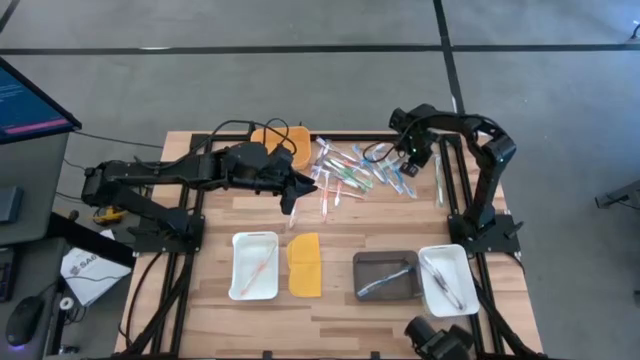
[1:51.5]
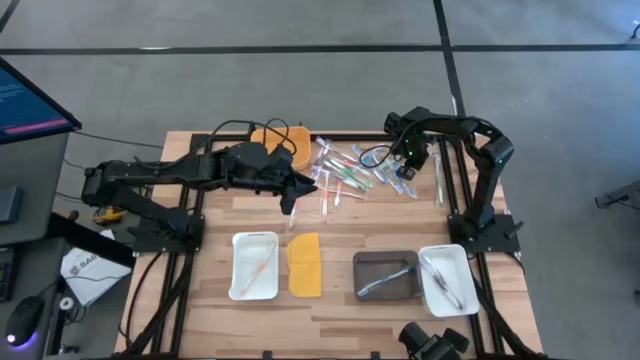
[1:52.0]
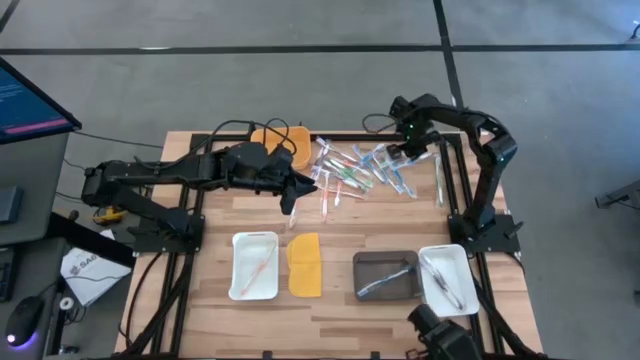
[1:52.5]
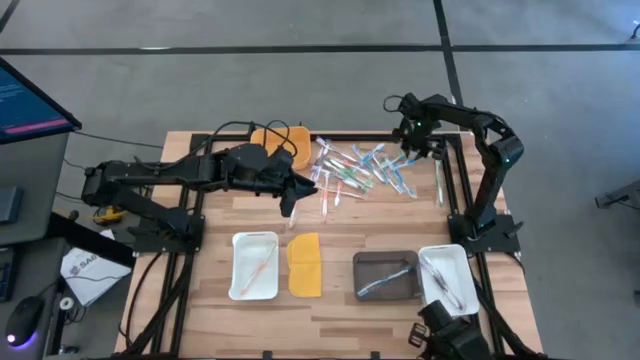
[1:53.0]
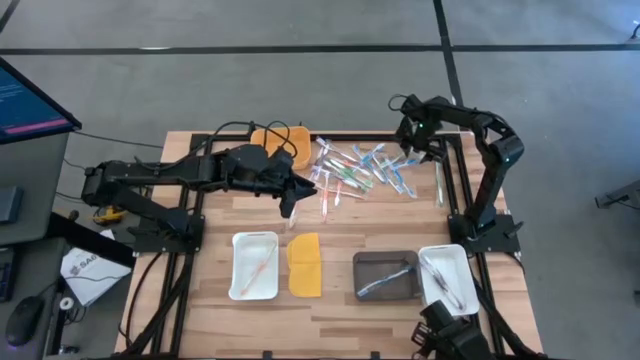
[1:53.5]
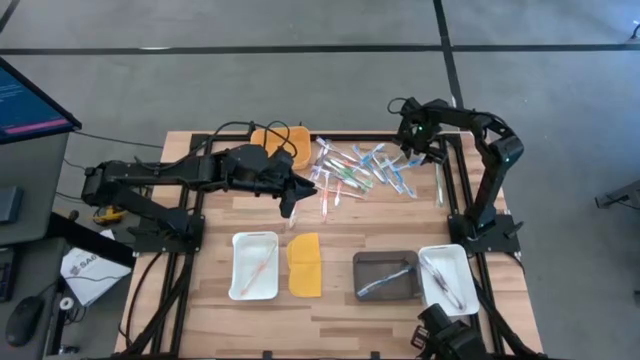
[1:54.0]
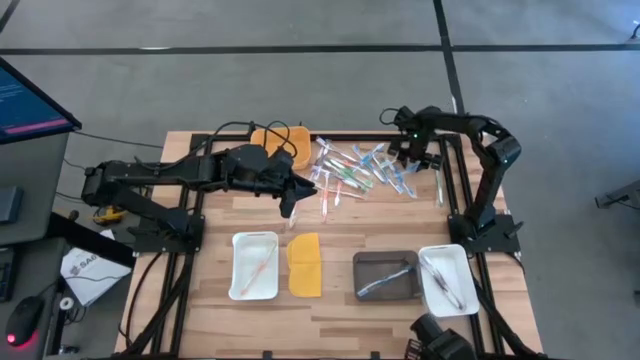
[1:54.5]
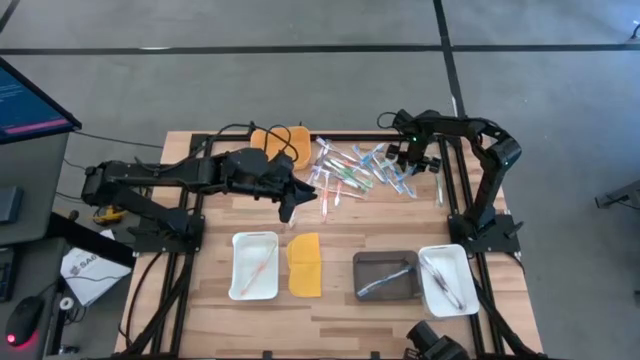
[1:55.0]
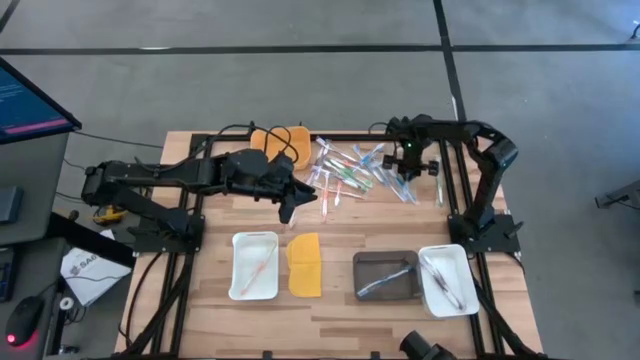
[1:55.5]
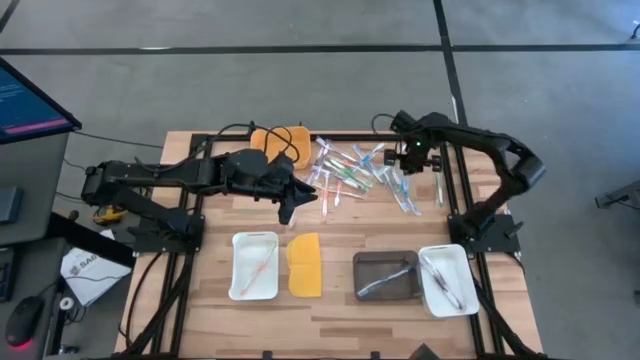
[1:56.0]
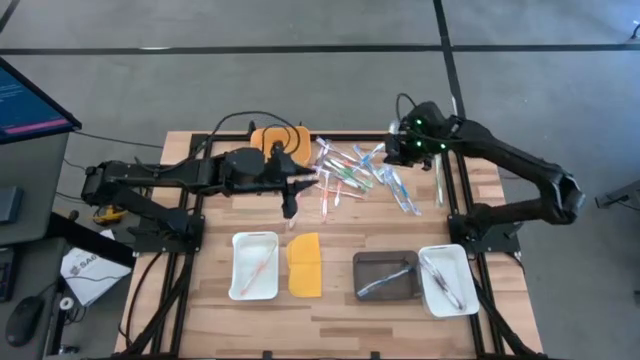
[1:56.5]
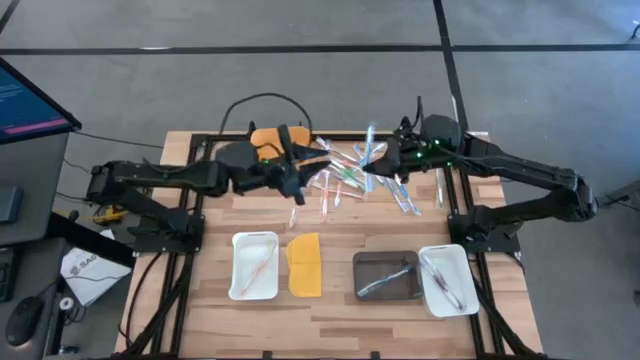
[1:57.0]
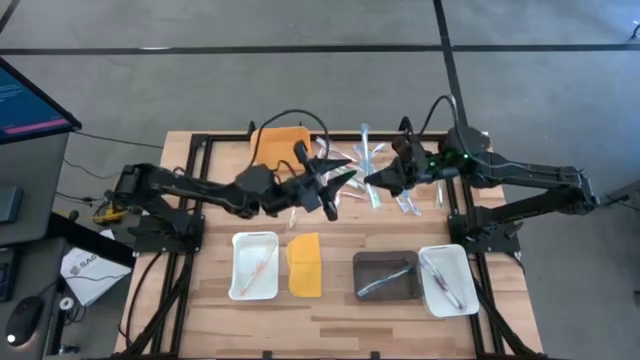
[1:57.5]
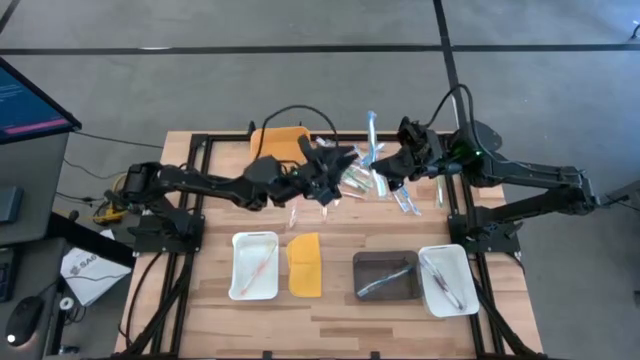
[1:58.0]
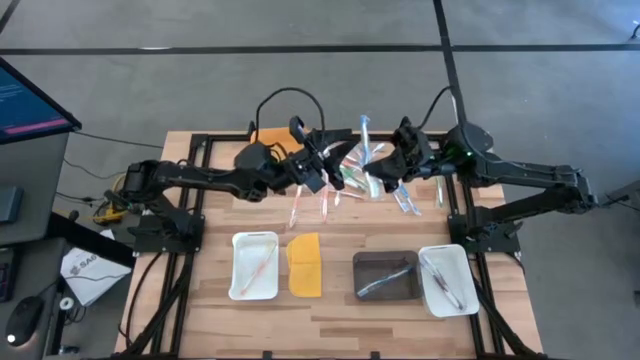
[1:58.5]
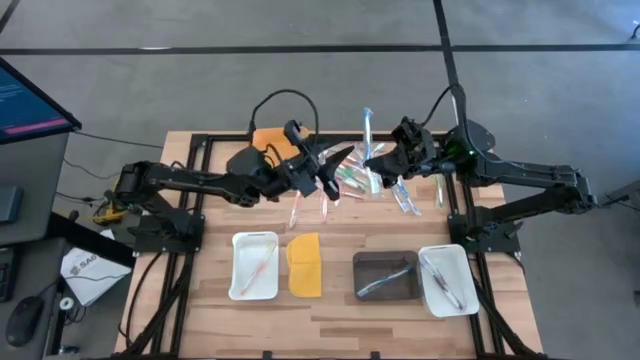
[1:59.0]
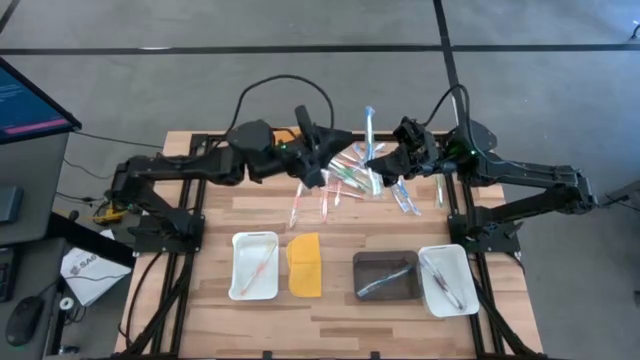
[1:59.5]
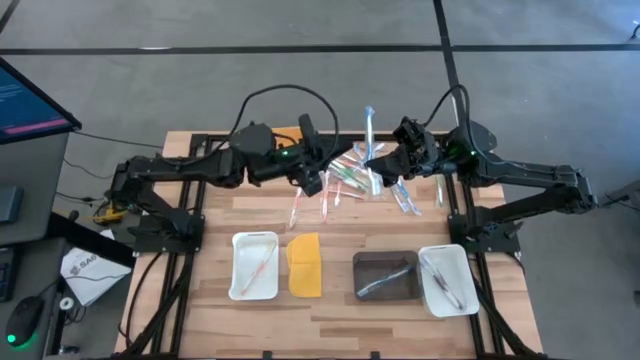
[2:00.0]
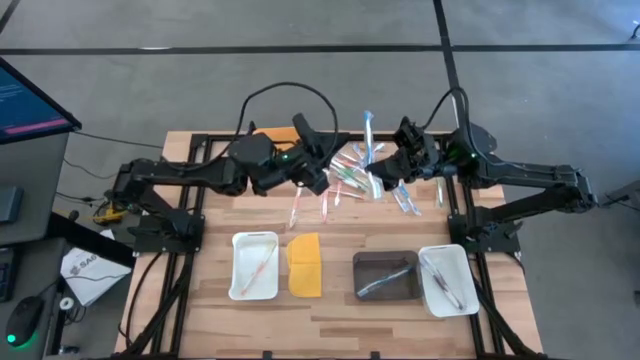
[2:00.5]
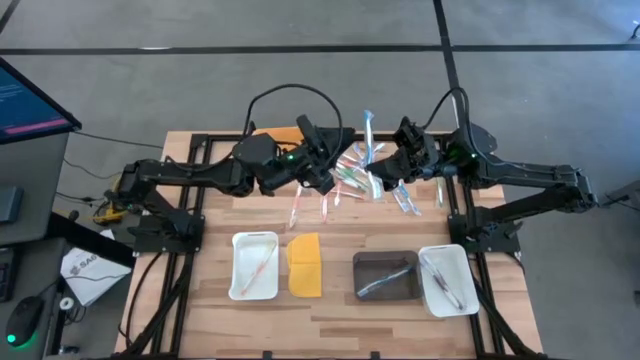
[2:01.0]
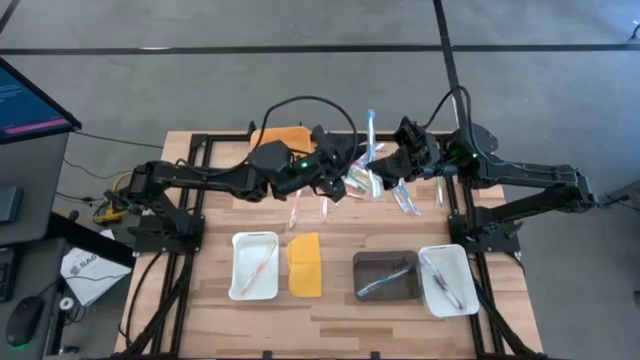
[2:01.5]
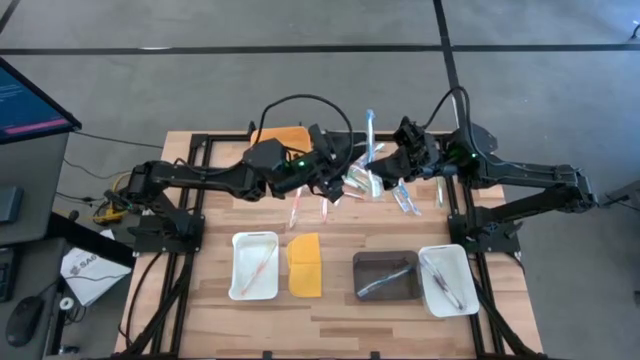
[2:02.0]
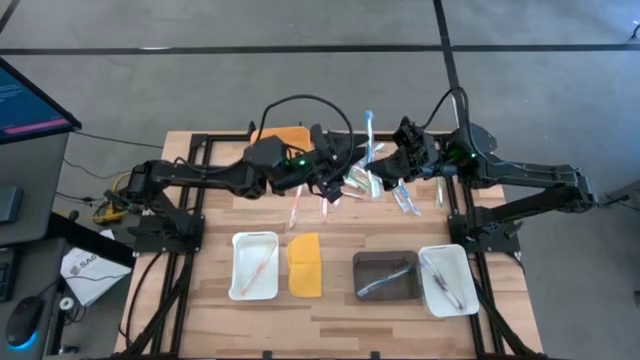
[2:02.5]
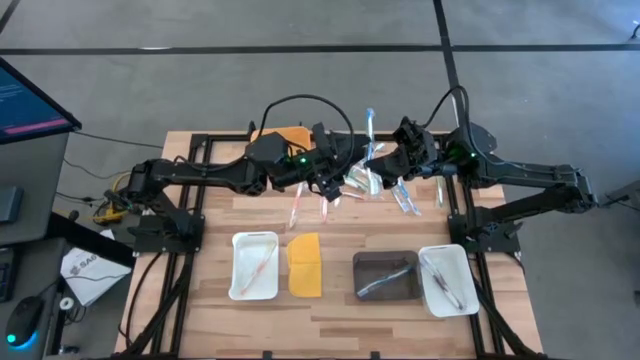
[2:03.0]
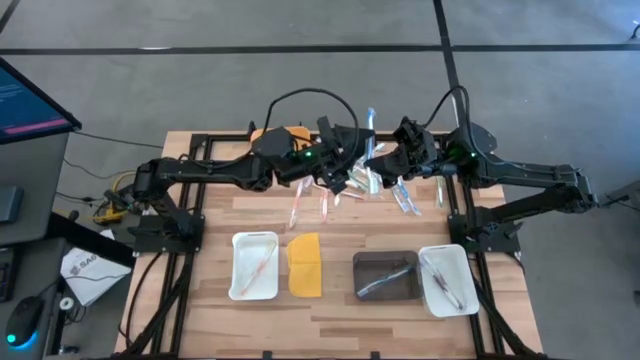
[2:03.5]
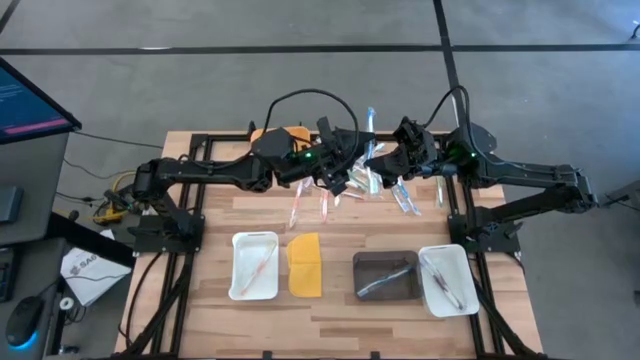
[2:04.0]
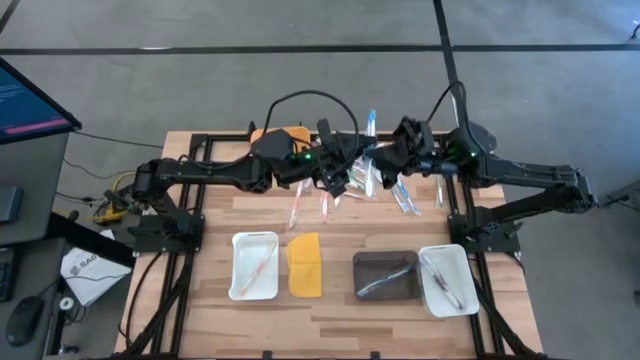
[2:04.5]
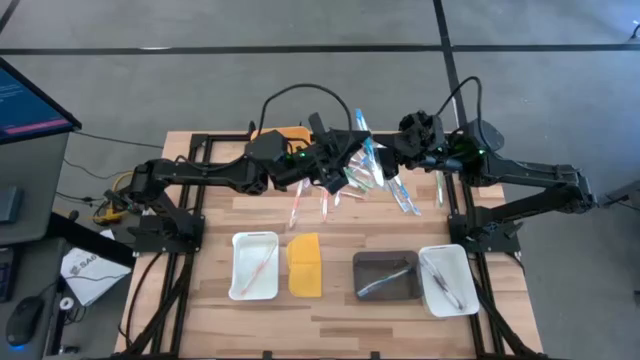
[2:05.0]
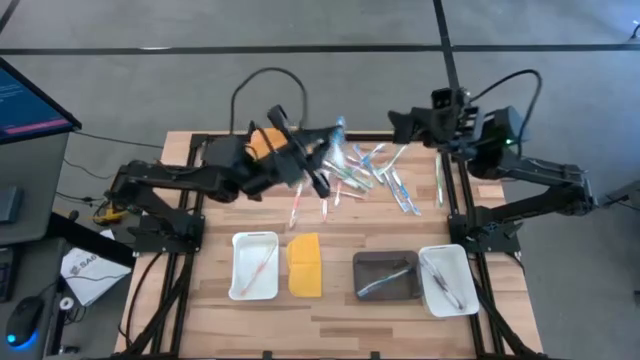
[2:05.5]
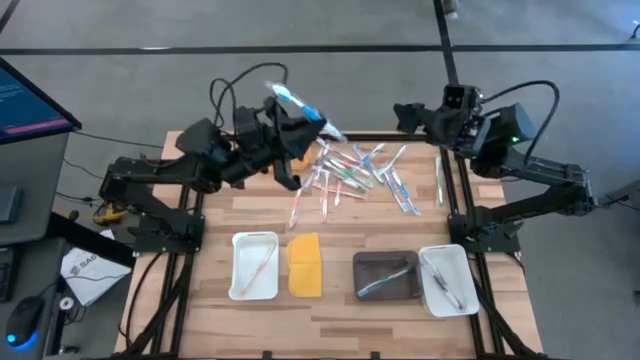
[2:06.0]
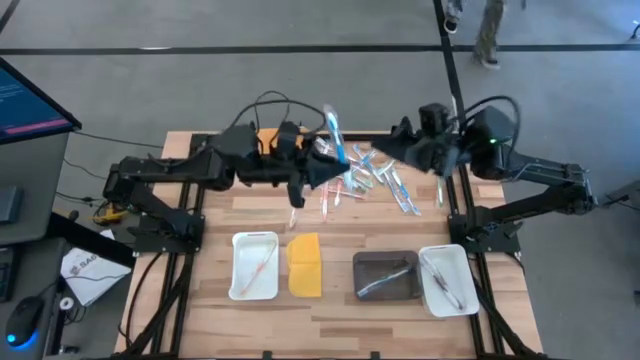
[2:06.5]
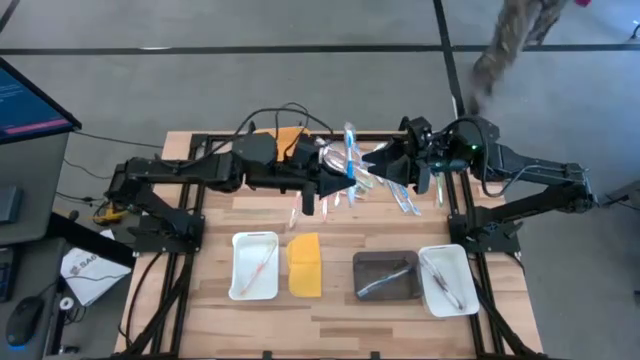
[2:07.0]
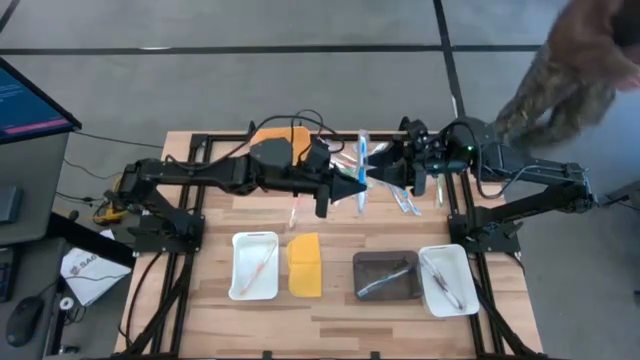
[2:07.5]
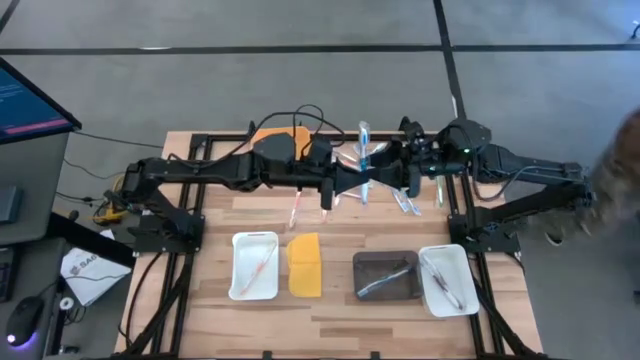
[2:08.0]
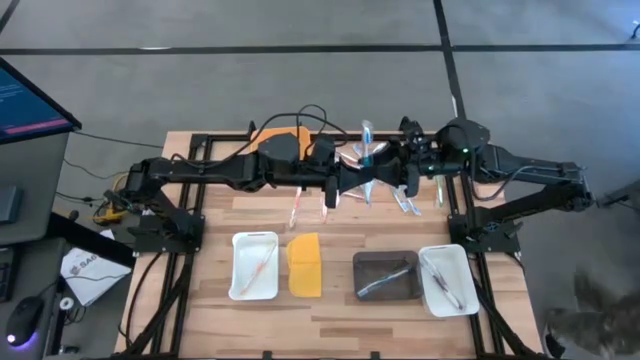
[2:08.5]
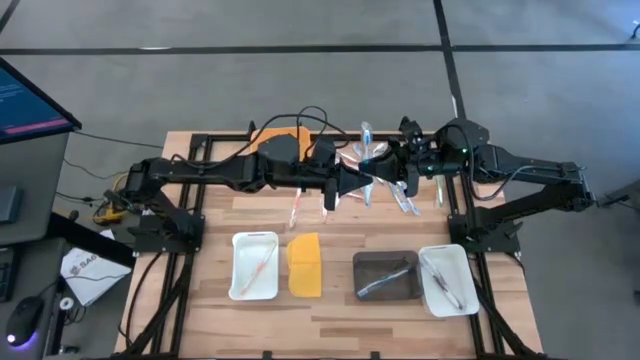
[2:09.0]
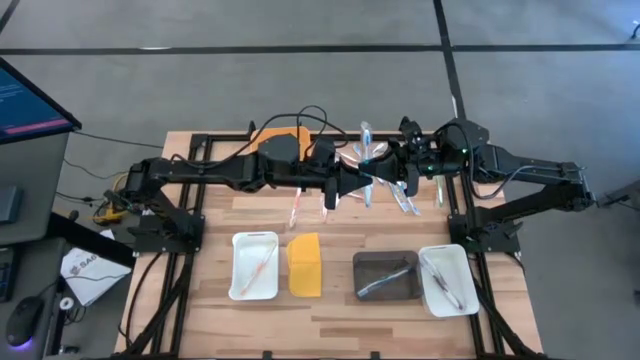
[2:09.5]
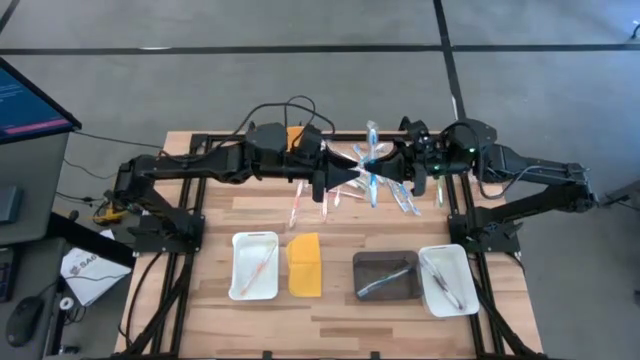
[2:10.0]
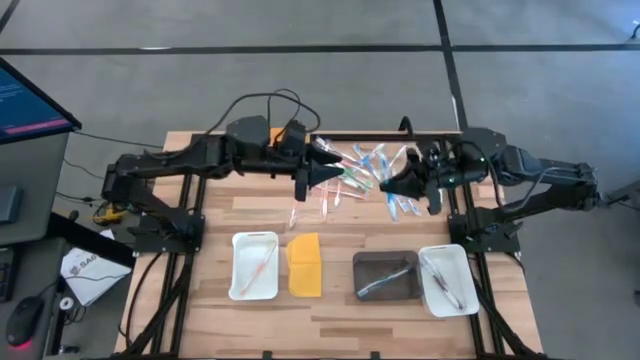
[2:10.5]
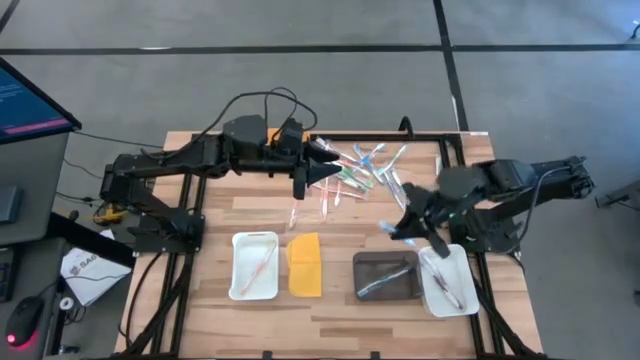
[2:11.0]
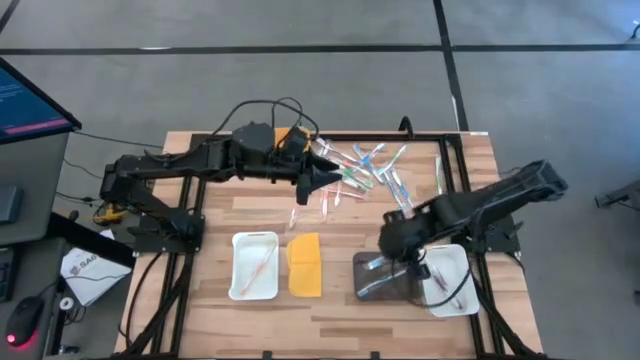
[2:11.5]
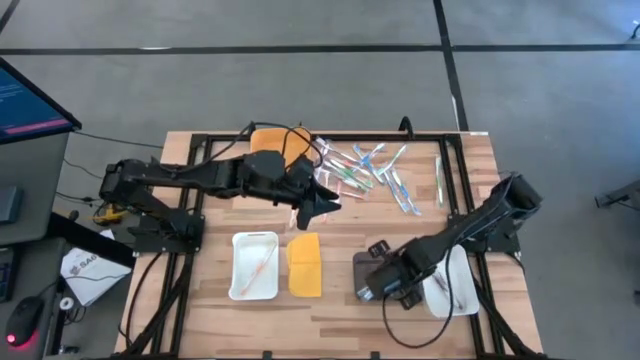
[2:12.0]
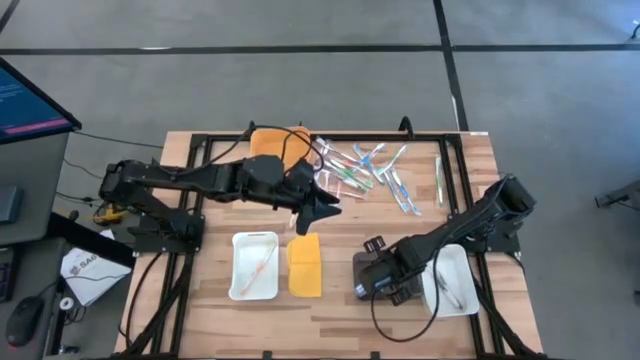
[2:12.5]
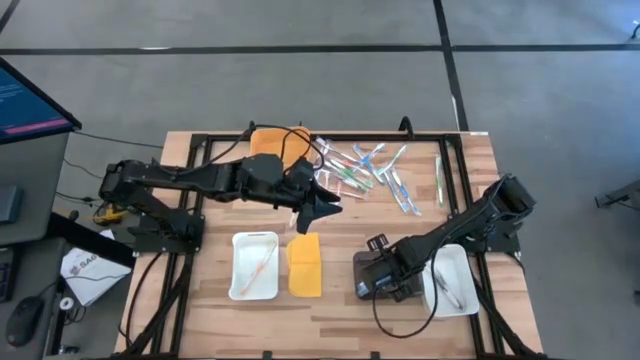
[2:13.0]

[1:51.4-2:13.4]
Task: Pick & Place Toothbrushes
Put the blue toothbrush into the black bin
